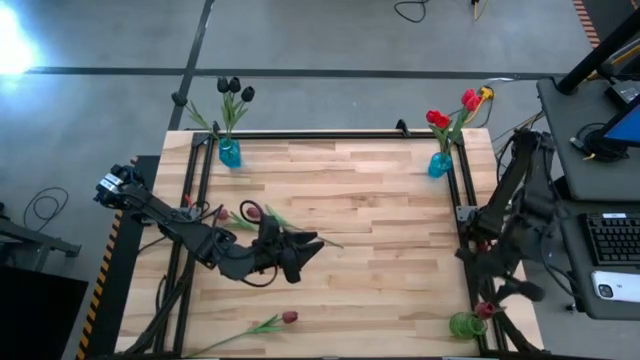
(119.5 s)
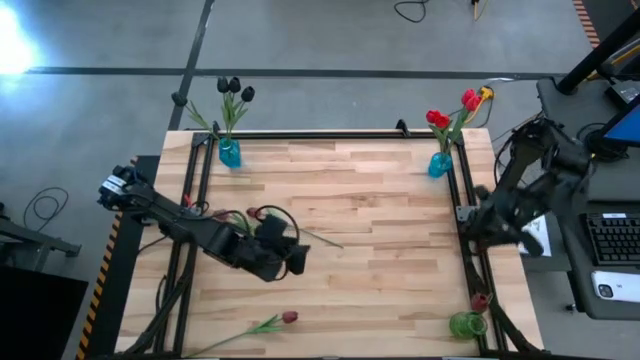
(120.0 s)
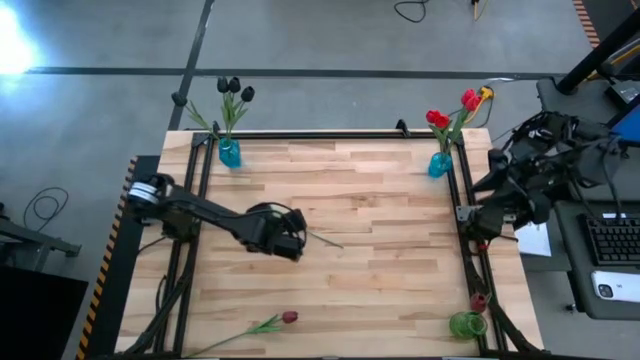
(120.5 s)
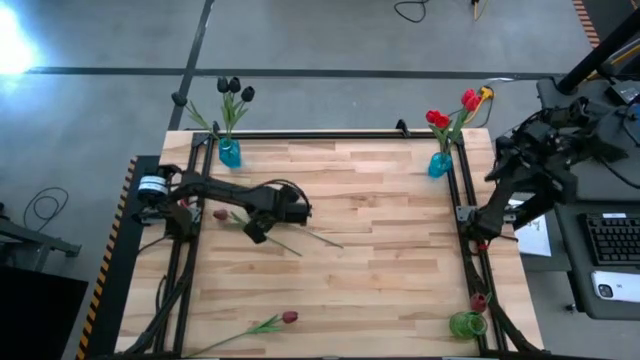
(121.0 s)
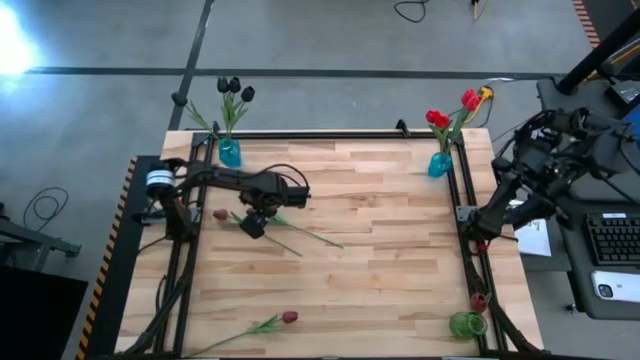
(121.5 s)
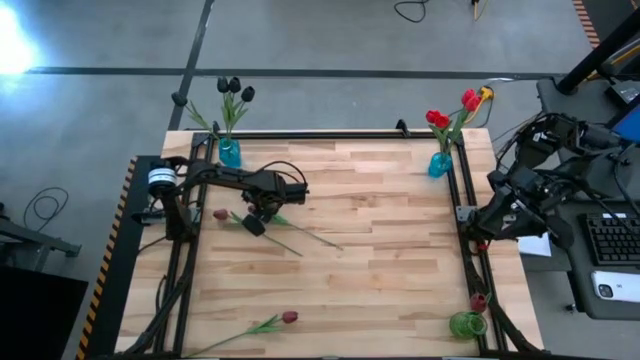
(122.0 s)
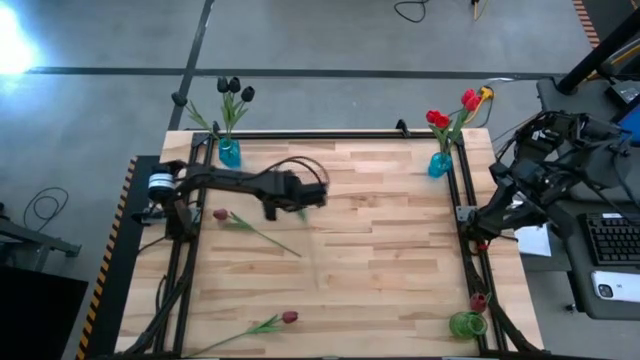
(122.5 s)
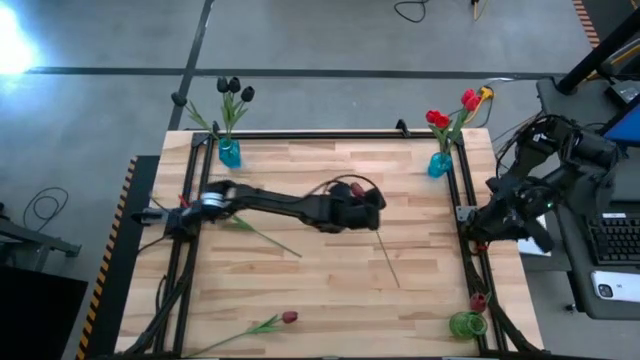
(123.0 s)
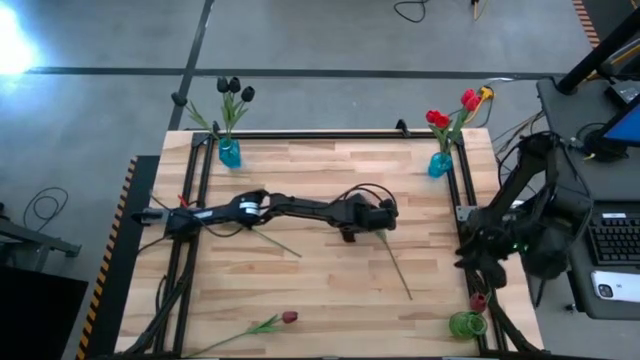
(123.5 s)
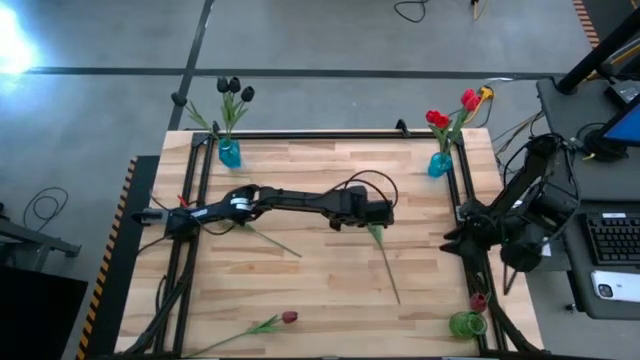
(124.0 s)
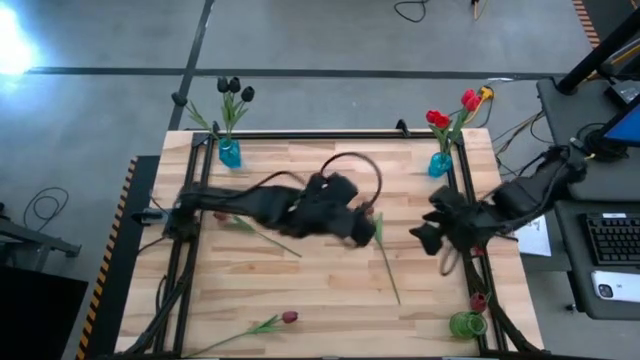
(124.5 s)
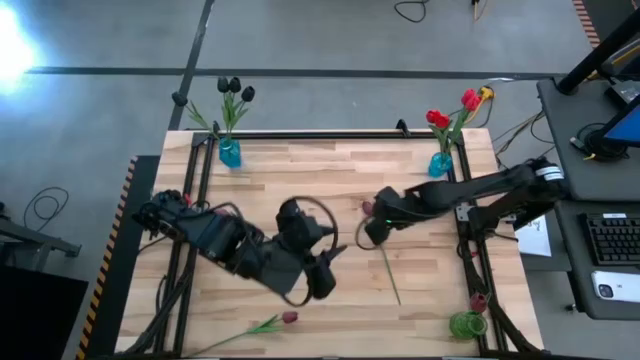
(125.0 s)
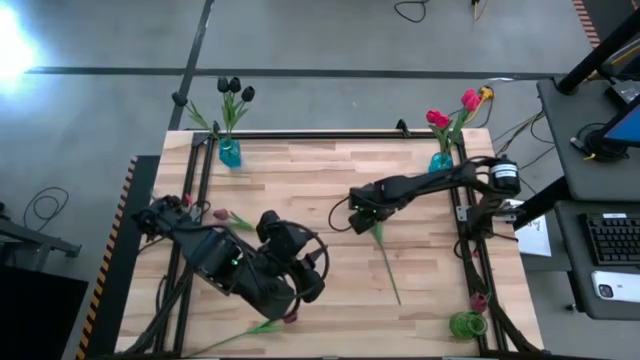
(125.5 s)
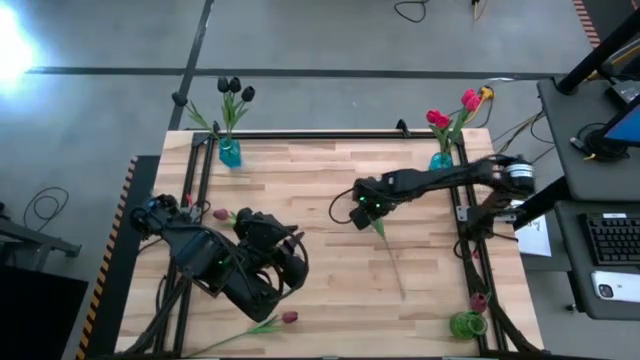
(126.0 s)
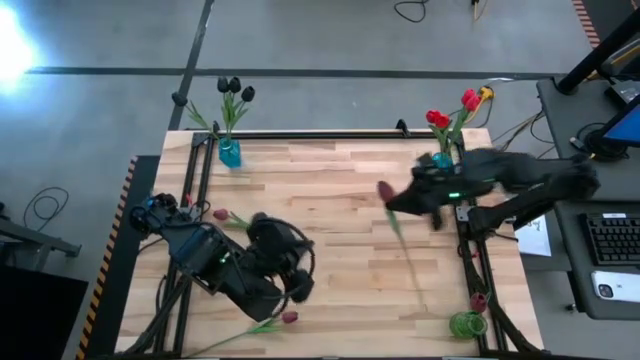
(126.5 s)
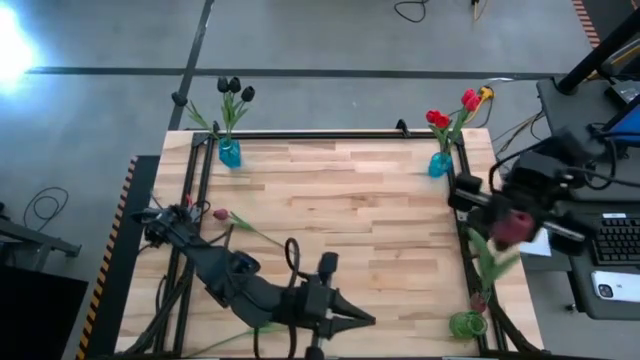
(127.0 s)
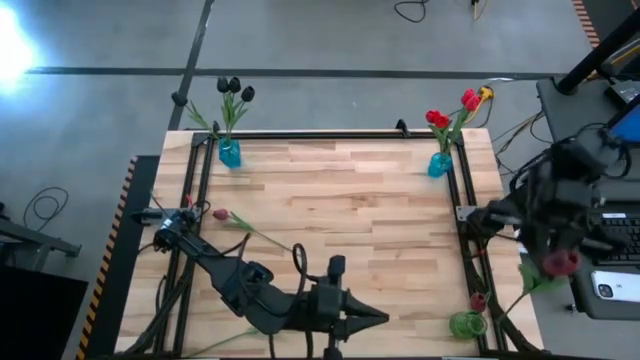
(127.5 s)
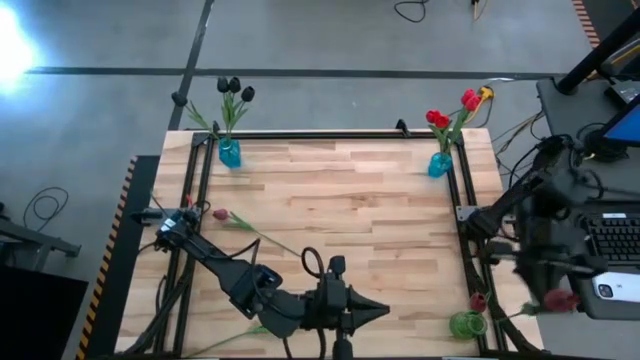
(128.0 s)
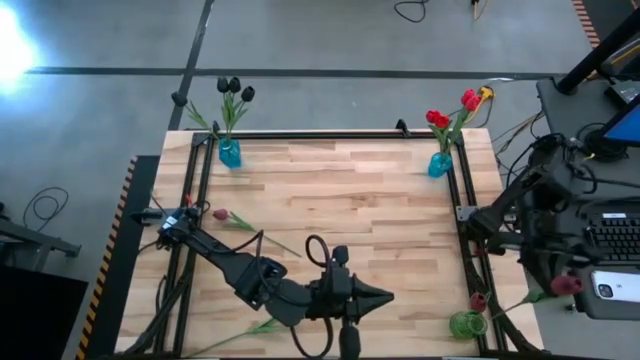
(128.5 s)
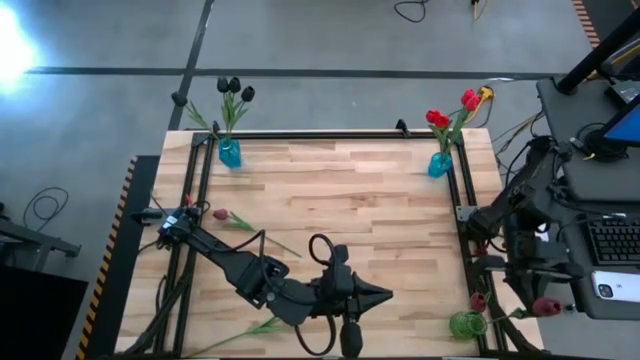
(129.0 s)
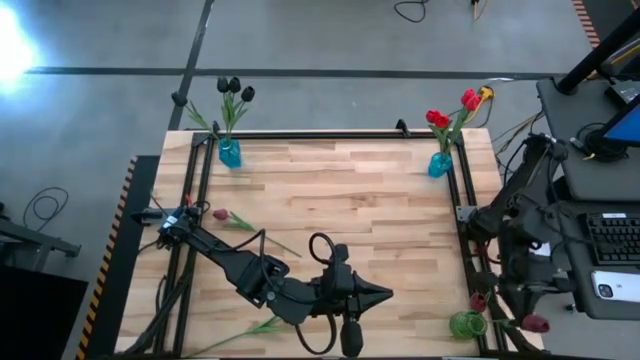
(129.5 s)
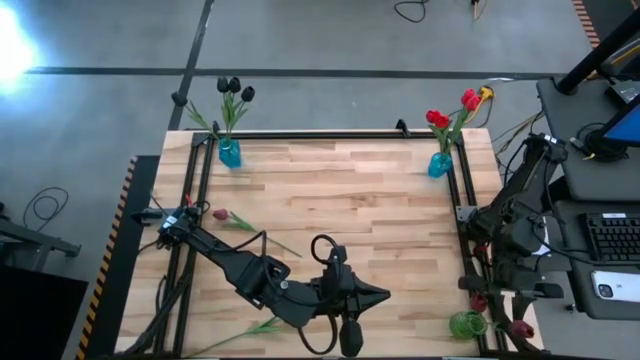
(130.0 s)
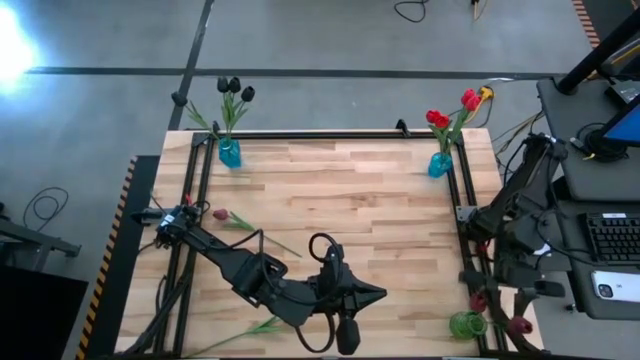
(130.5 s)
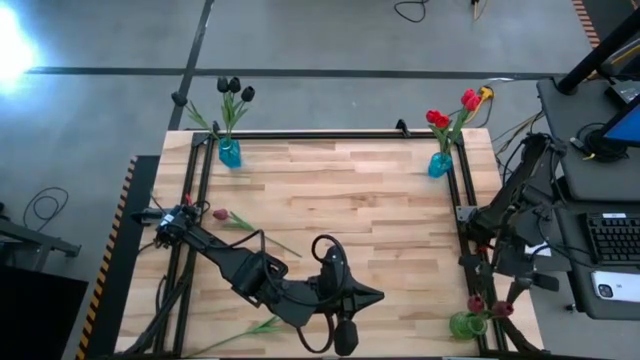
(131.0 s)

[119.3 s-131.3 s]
Task: Sort flowers into vase by color
Put the dark red tulip into the green vase

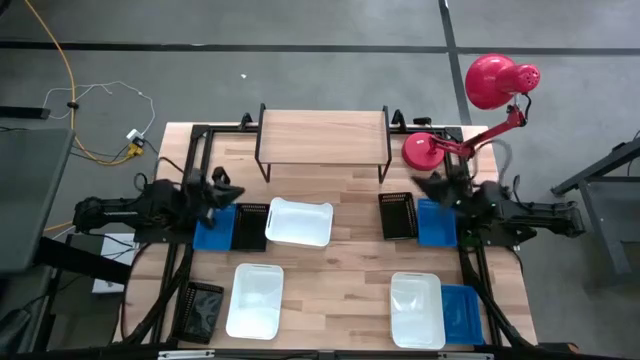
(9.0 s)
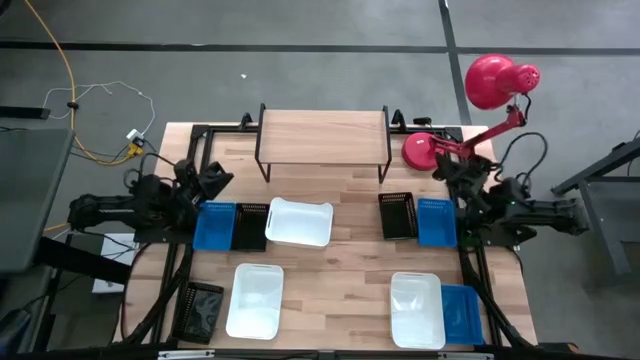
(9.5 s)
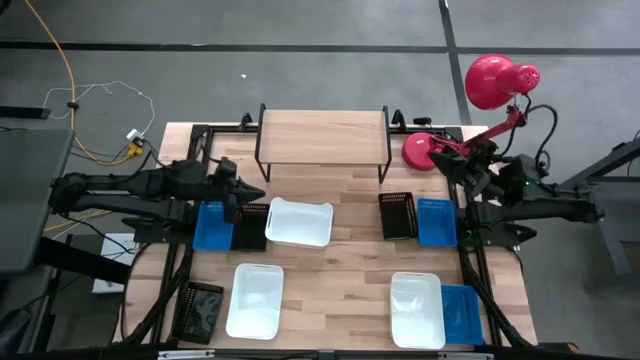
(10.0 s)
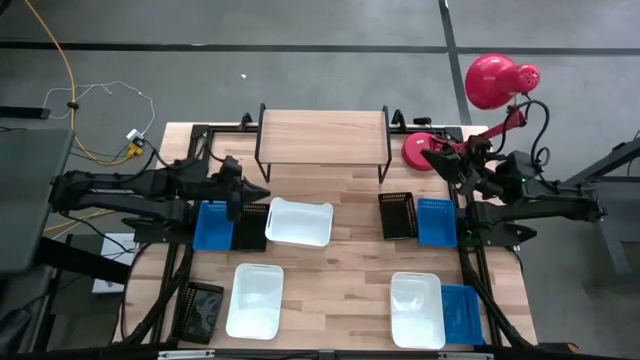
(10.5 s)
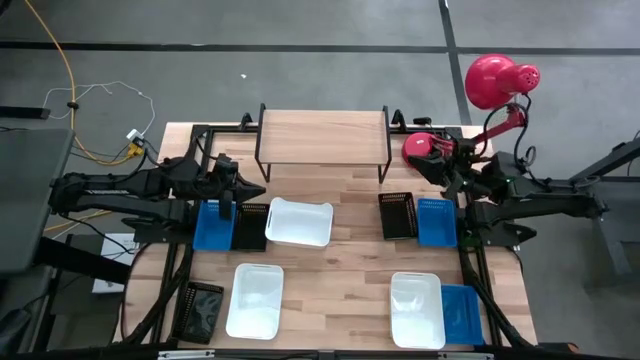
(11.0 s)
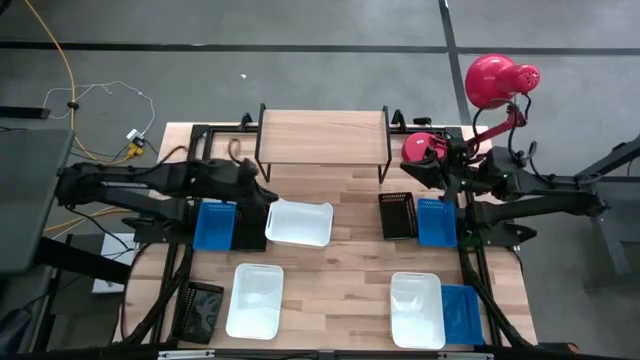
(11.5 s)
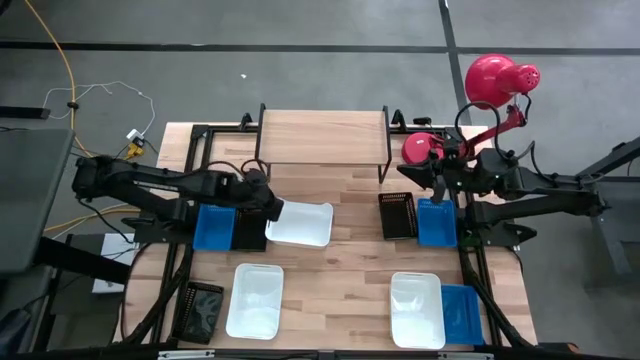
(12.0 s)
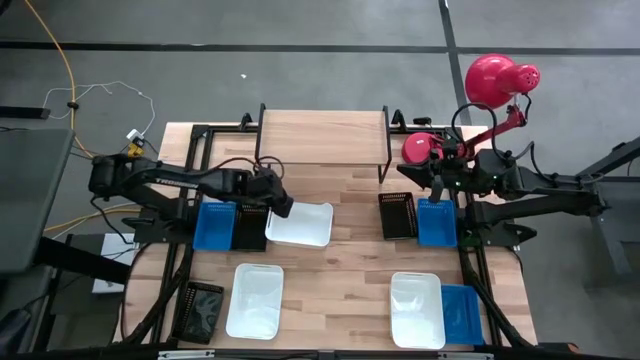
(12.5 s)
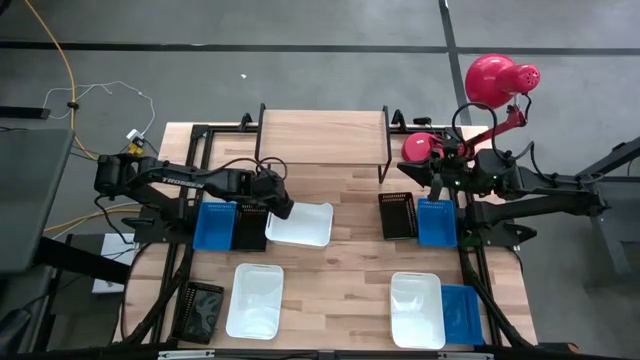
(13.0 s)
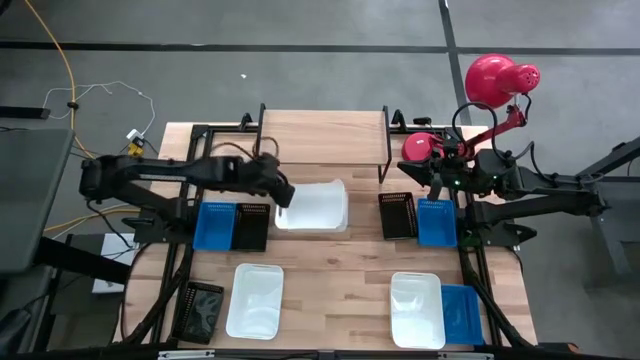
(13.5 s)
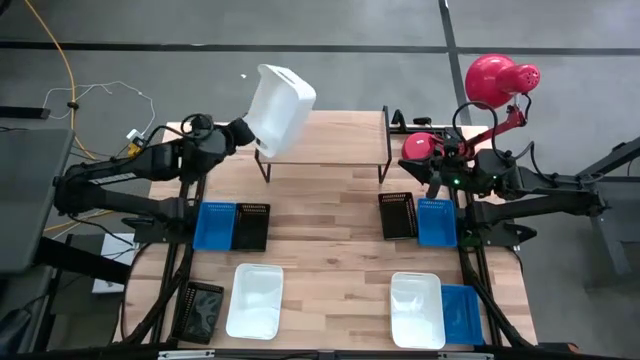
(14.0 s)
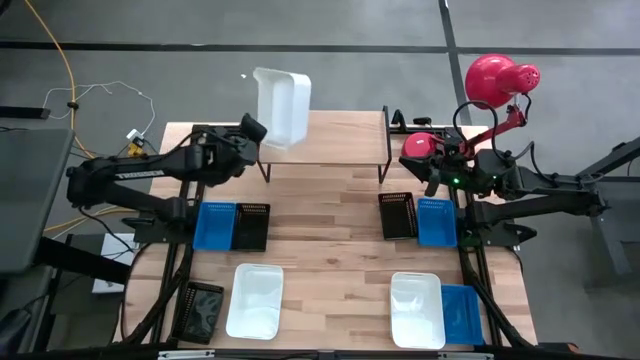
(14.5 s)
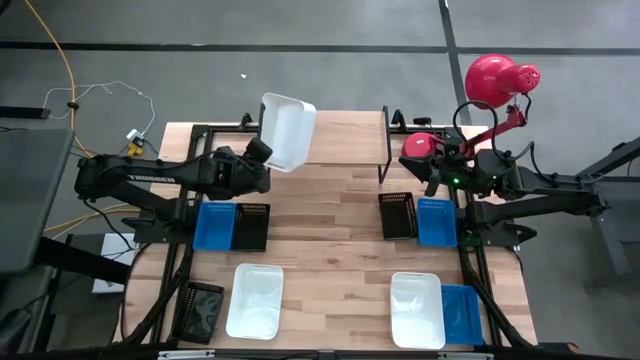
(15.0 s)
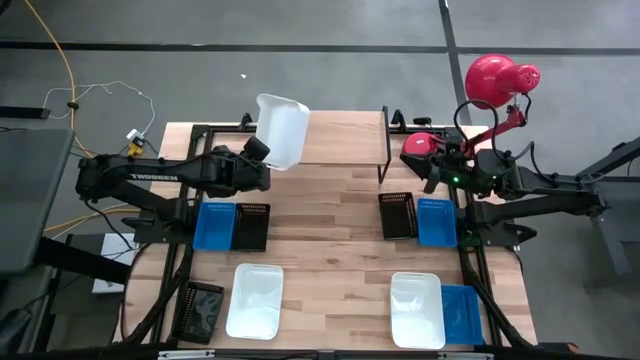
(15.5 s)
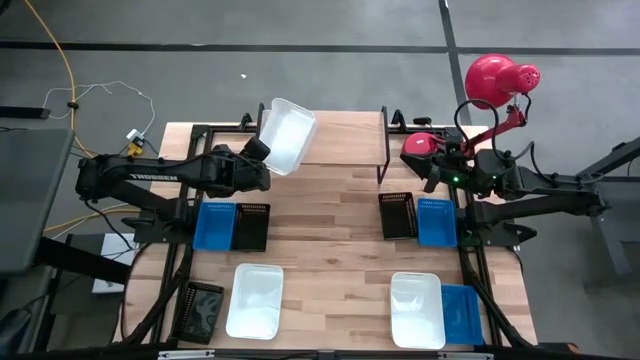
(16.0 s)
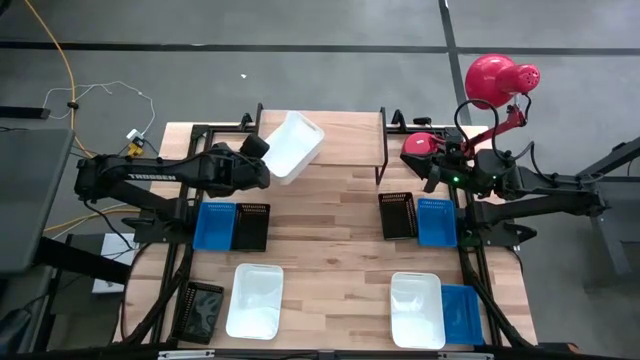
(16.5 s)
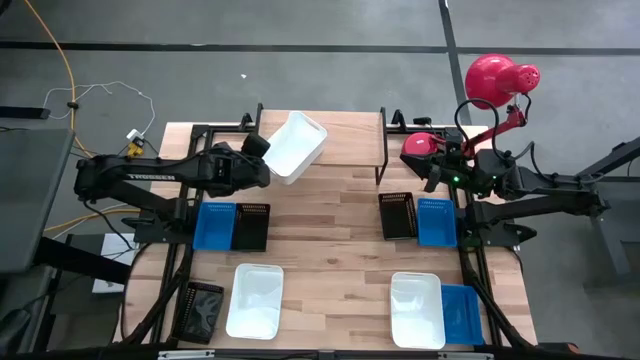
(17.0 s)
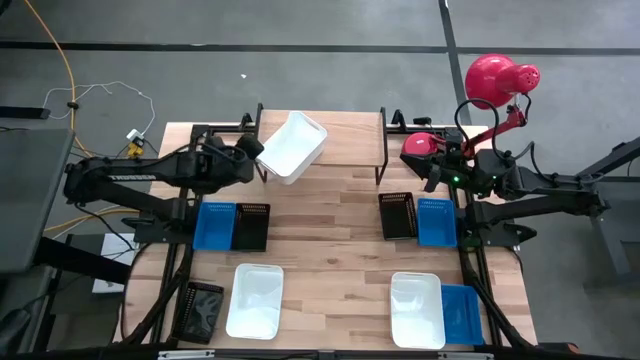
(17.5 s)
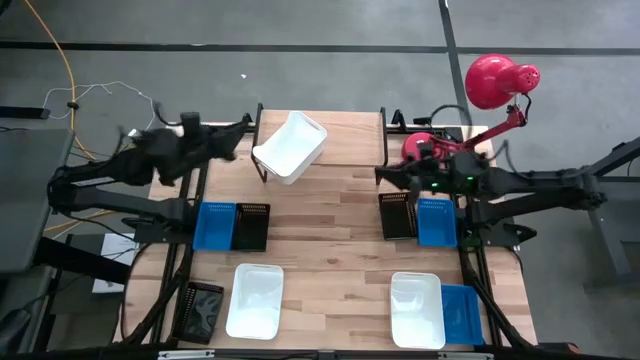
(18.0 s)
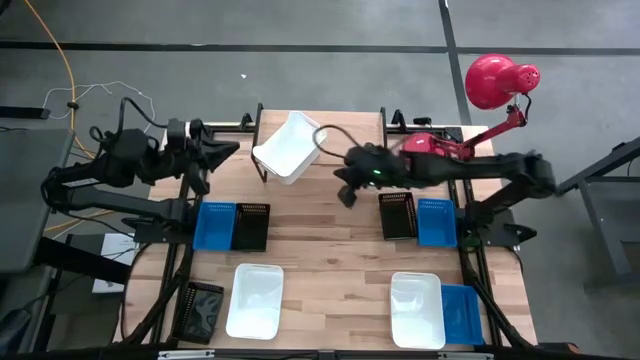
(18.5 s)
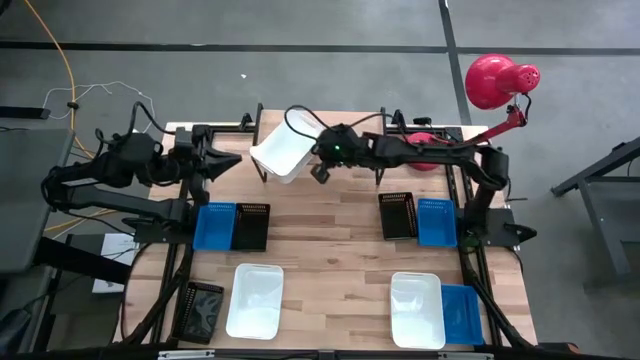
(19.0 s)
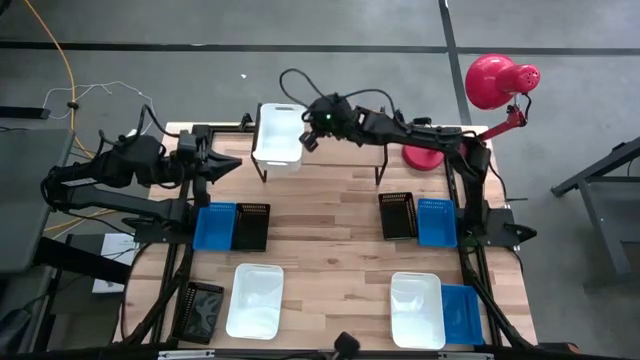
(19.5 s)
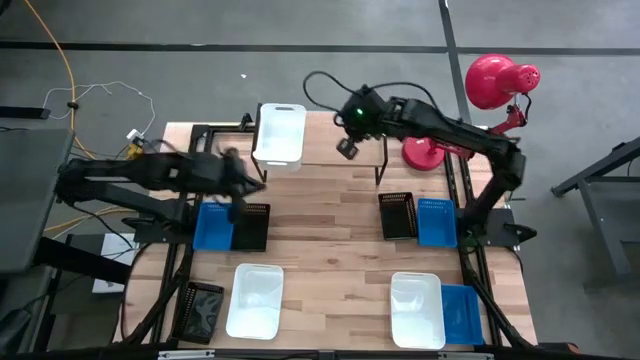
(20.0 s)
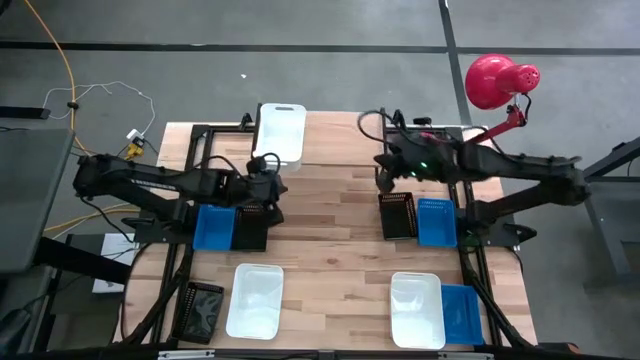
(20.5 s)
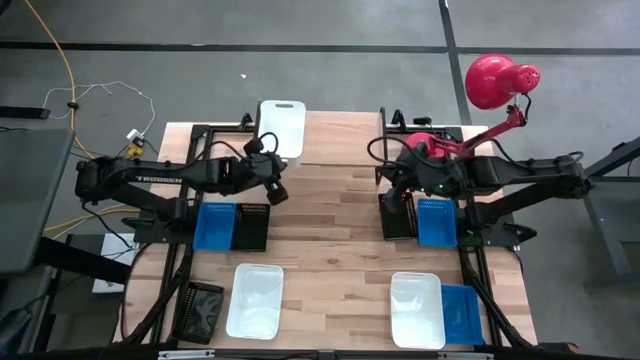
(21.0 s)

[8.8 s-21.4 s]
Task: Stack baskets on shelf by color
Put the top white bin on the shelf
